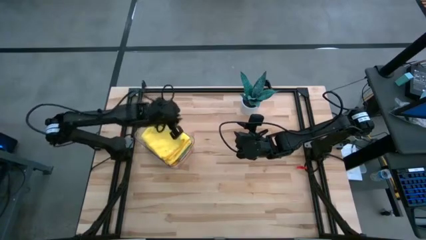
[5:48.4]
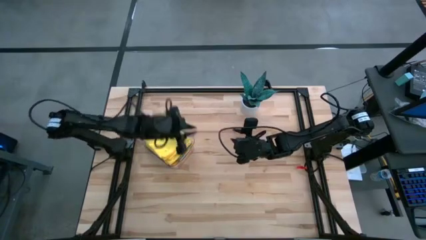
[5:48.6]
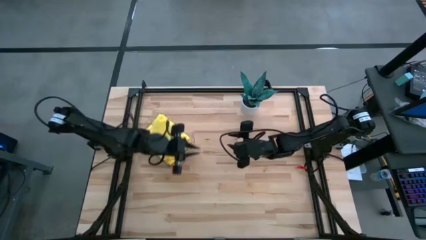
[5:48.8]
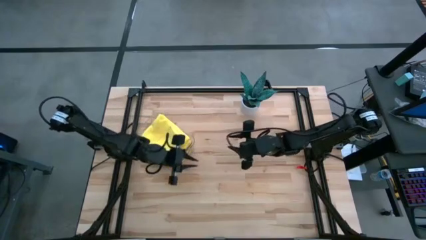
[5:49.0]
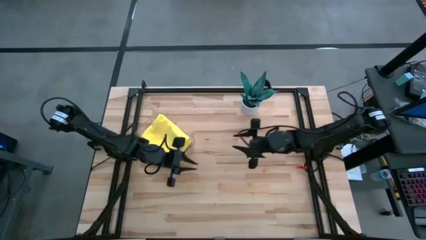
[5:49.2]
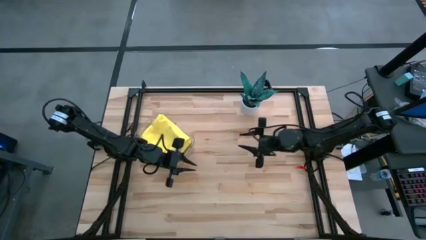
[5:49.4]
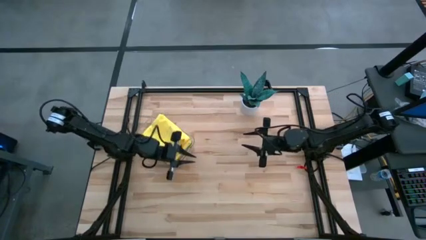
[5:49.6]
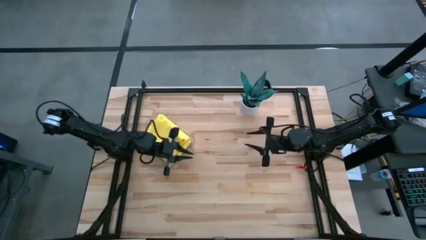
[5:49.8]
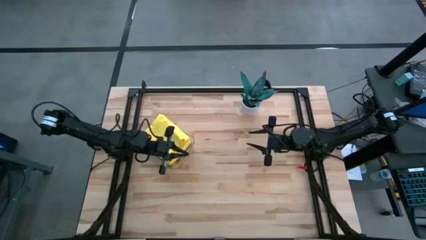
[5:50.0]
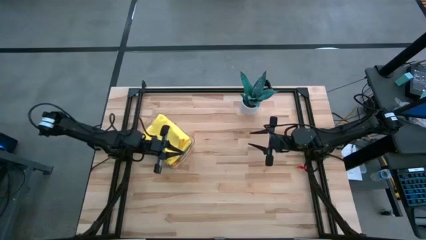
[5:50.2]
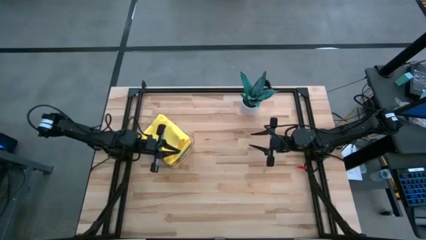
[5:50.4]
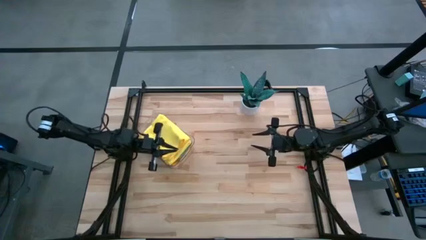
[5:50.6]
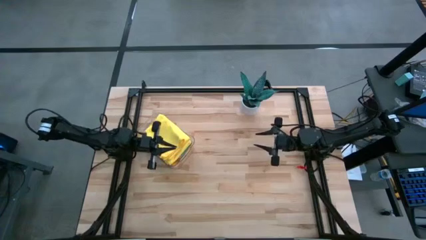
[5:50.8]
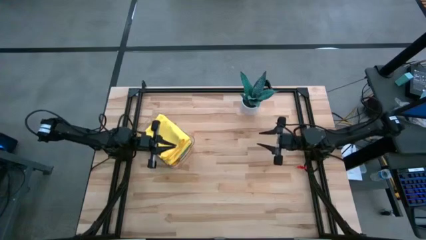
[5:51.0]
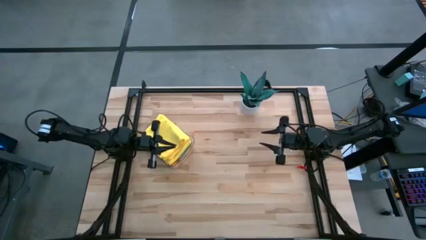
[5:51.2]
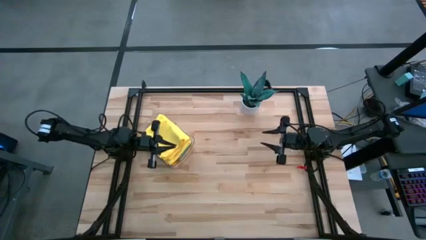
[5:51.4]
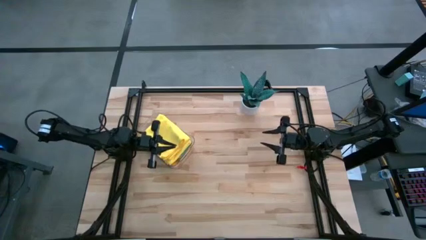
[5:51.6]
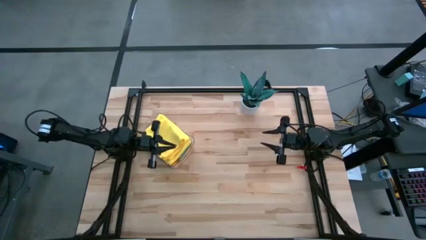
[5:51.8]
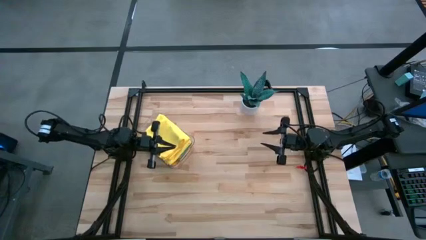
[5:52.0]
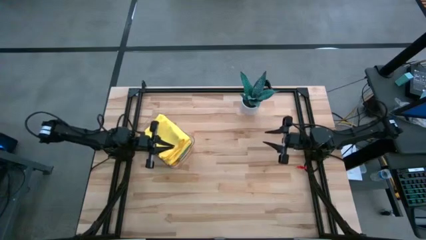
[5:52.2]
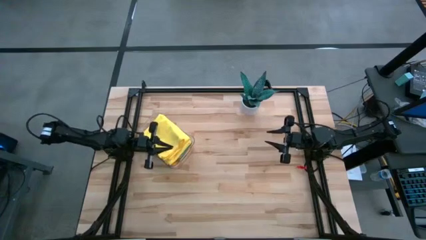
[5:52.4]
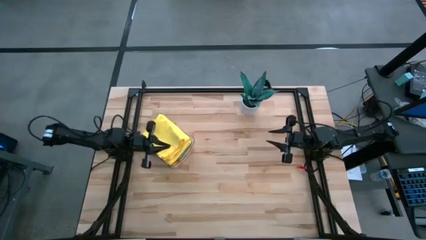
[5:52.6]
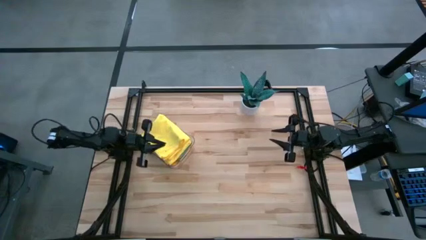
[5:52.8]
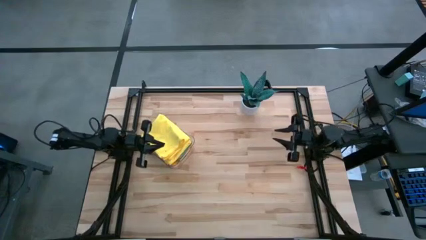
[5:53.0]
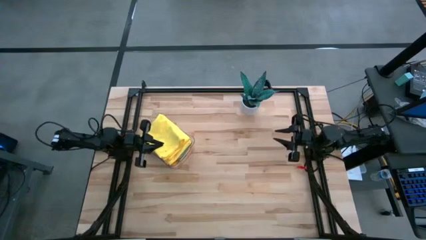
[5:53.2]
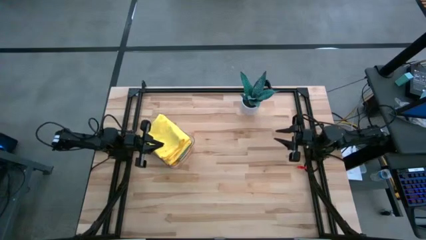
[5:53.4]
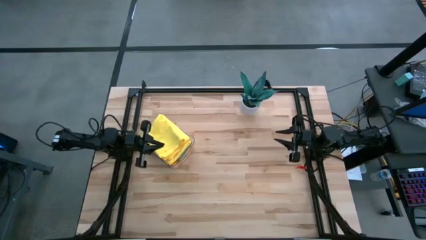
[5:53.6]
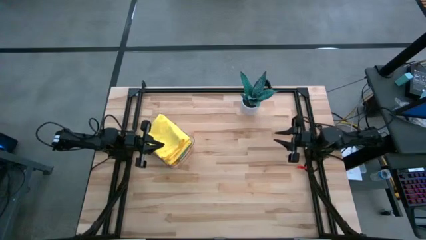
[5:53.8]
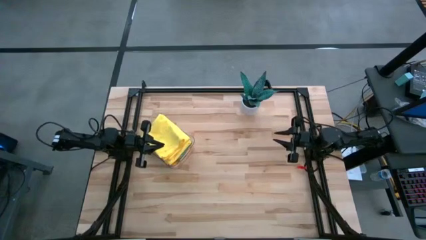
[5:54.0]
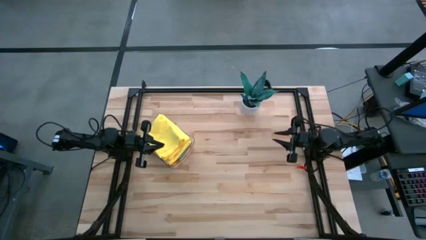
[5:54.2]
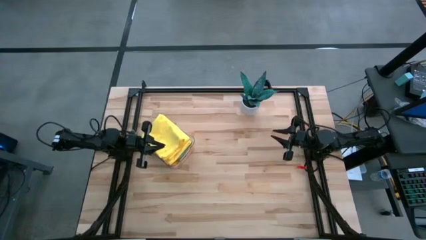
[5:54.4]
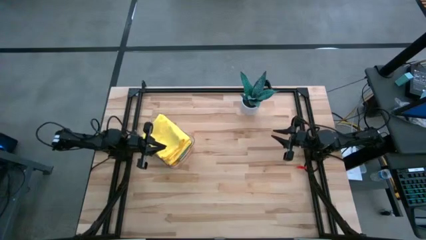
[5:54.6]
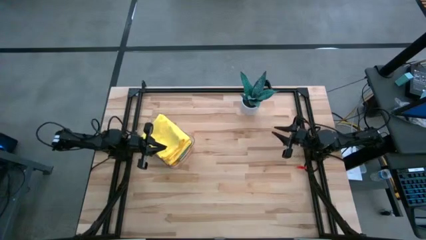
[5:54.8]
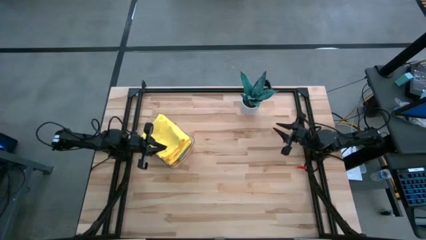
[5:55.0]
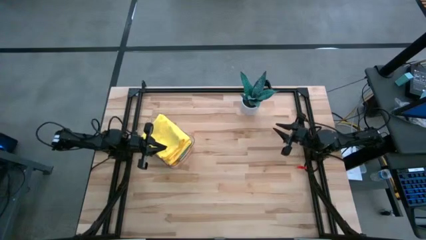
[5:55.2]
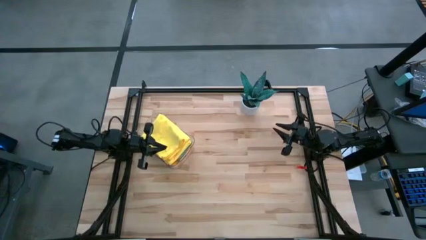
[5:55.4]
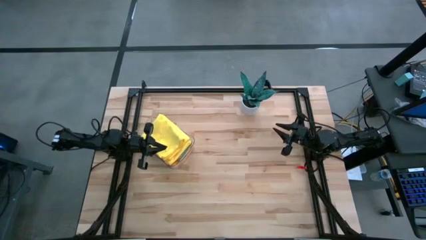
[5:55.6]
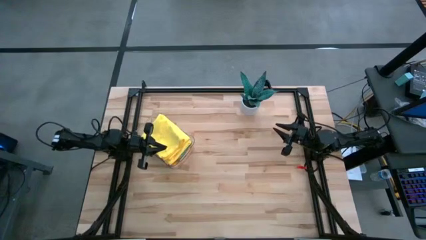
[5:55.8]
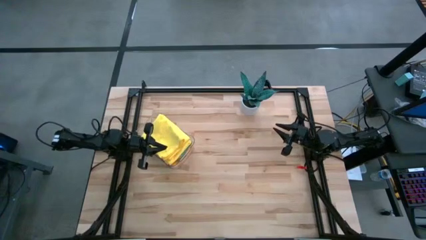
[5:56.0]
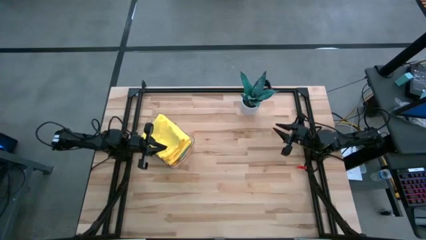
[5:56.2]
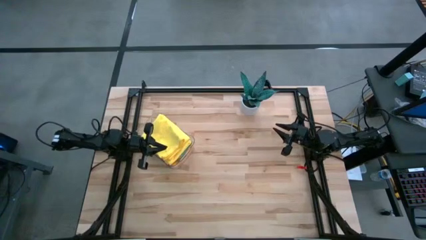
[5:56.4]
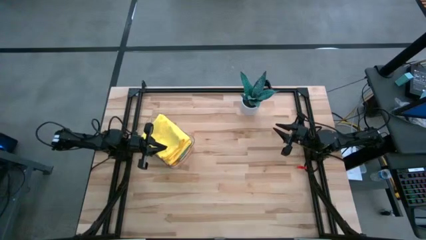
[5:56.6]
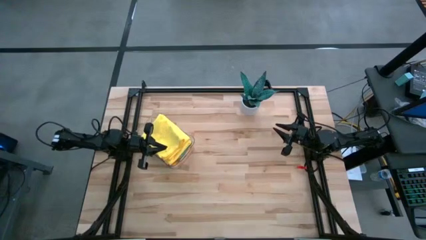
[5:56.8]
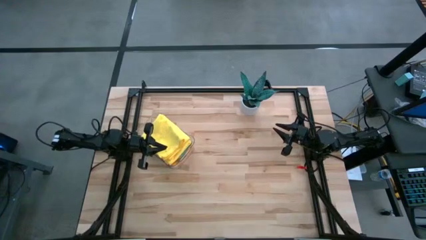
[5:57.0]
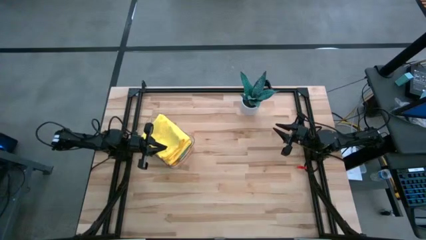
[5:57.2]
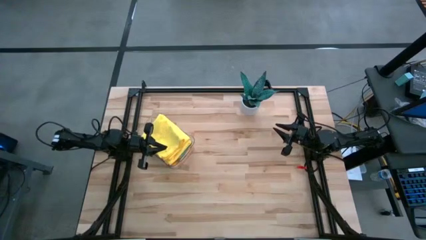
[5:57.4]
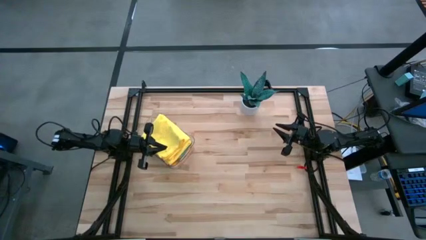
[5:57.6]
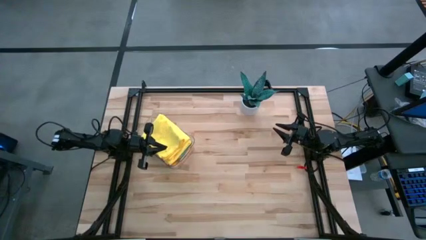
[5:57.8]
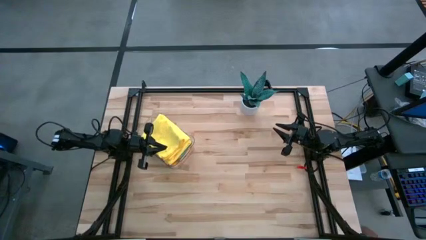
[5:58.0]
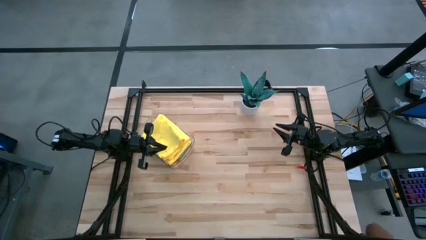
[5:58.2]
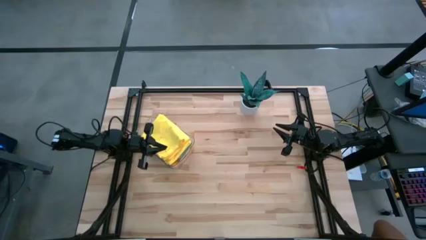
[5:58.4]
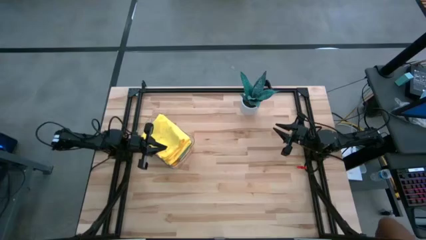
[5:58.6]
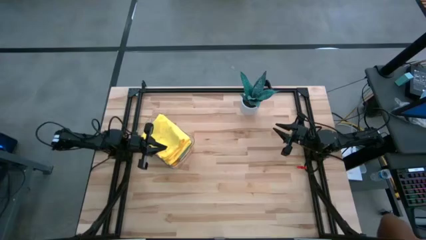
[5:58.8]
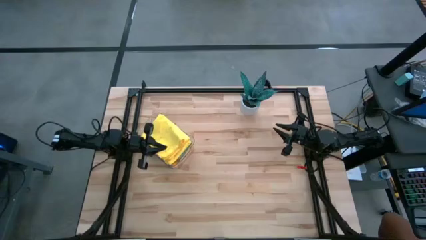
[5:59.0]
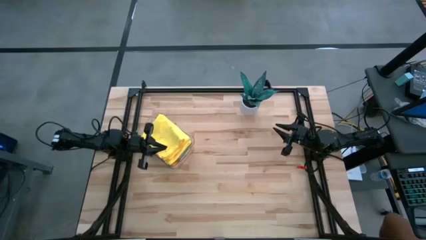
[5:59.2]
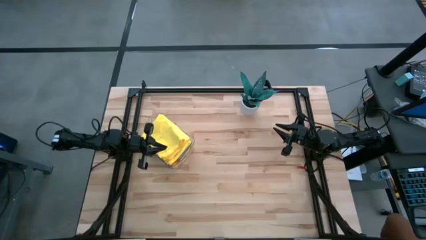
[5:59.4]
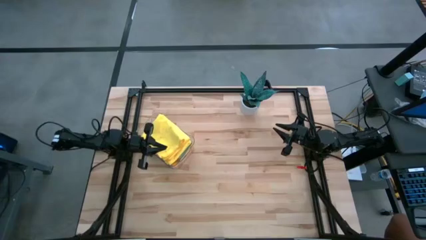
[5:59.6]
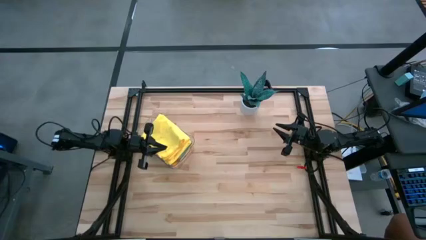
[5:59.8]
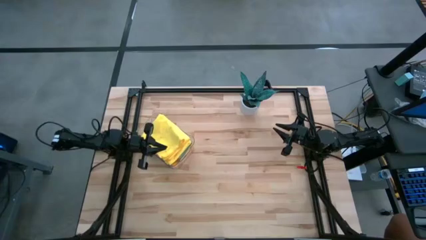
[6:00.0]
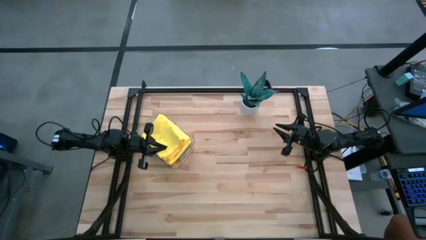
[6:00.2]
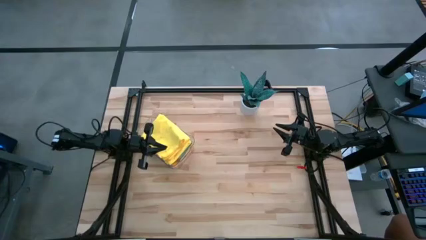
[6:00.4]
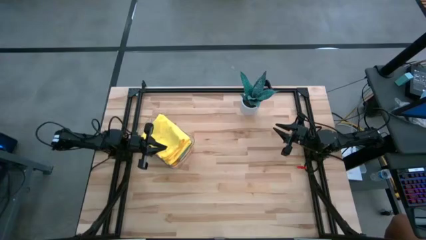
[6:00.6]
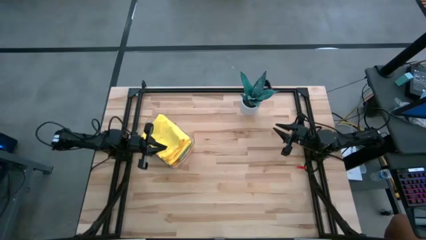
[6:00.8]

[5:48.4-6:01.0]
Task: Fold microfiber towels
Return to Home Position
